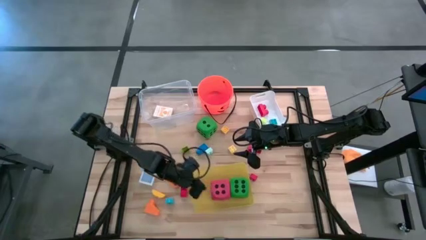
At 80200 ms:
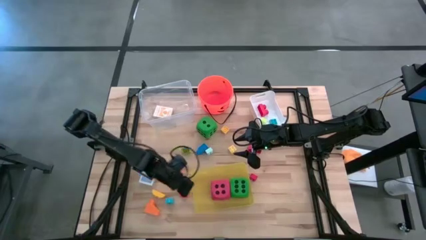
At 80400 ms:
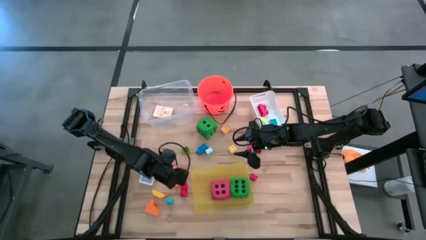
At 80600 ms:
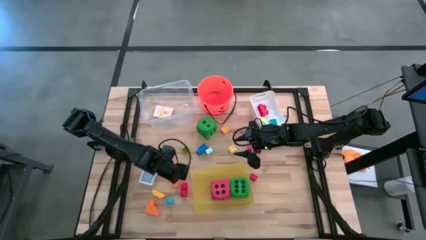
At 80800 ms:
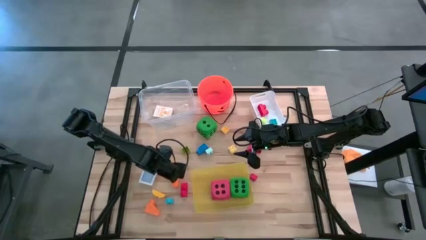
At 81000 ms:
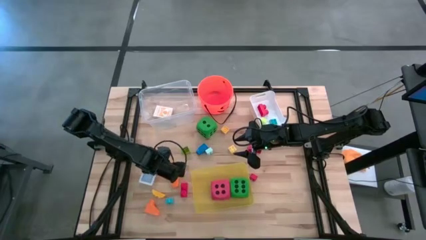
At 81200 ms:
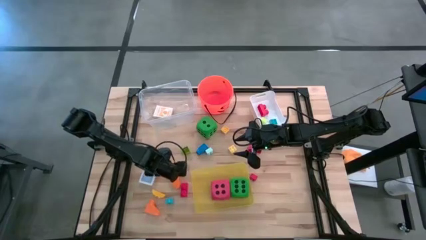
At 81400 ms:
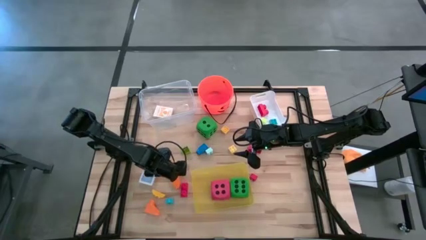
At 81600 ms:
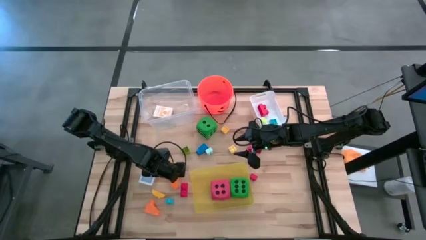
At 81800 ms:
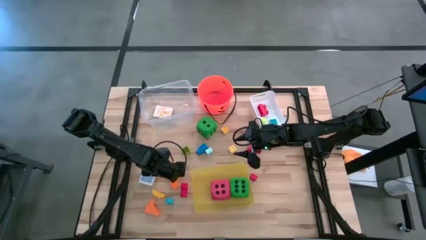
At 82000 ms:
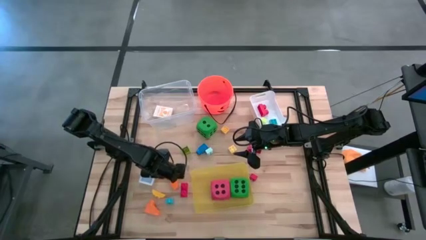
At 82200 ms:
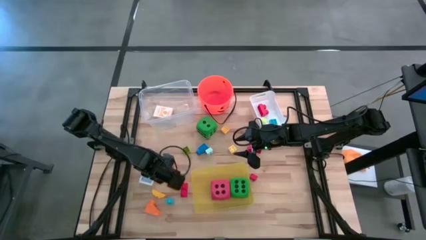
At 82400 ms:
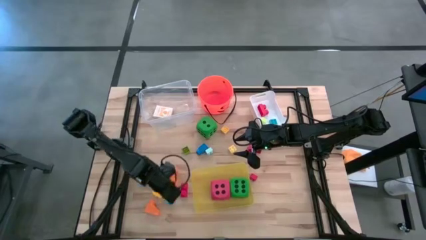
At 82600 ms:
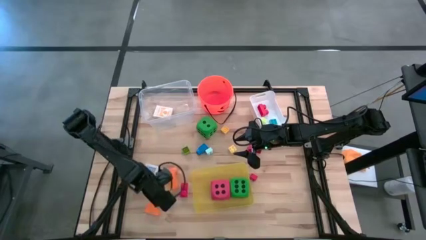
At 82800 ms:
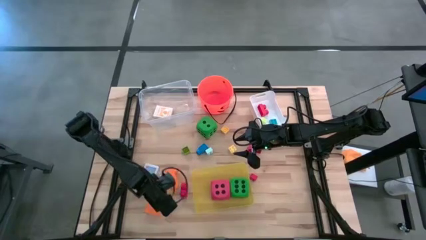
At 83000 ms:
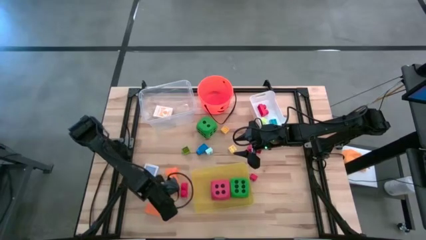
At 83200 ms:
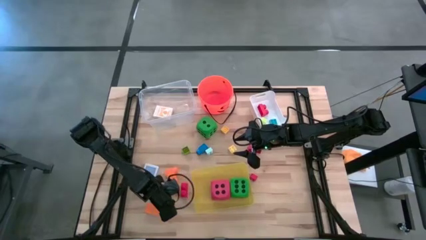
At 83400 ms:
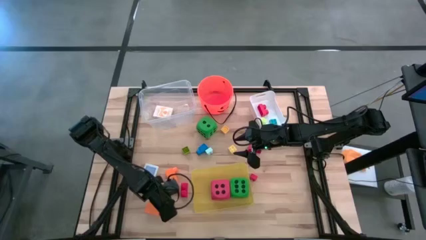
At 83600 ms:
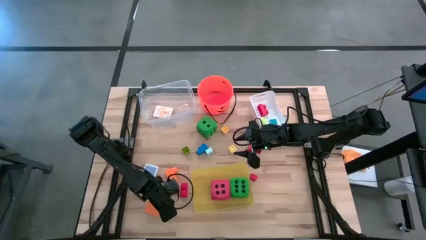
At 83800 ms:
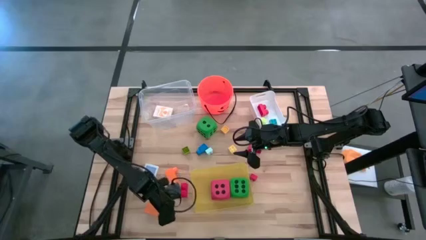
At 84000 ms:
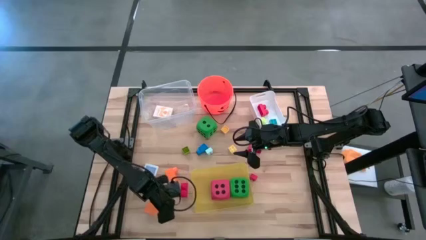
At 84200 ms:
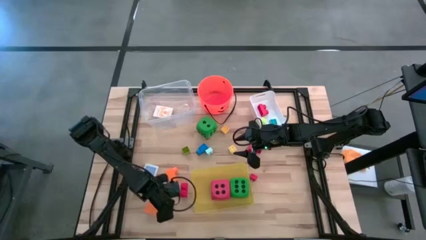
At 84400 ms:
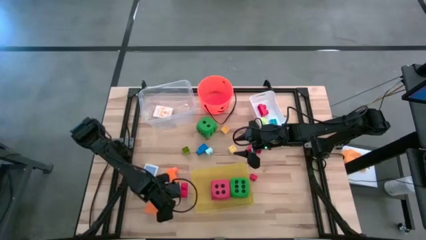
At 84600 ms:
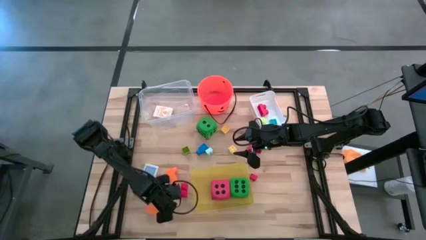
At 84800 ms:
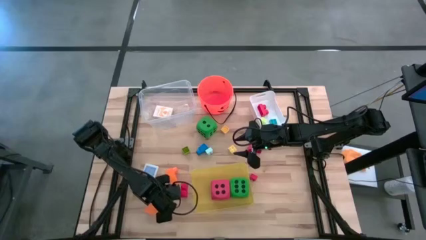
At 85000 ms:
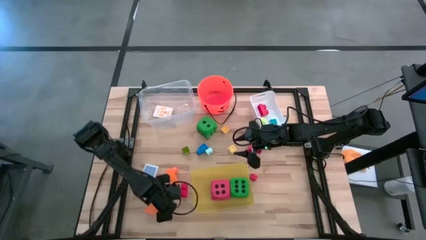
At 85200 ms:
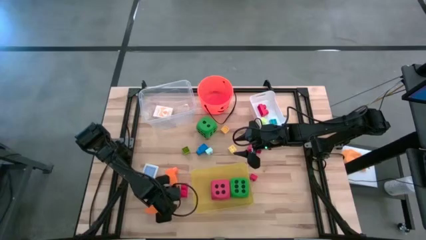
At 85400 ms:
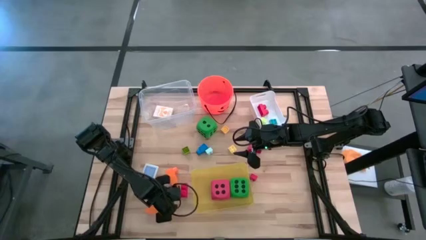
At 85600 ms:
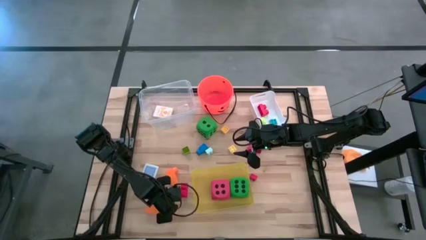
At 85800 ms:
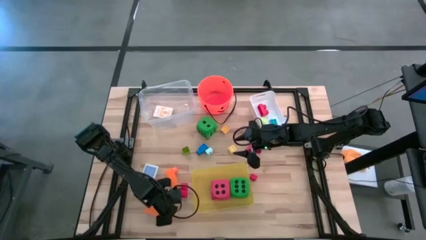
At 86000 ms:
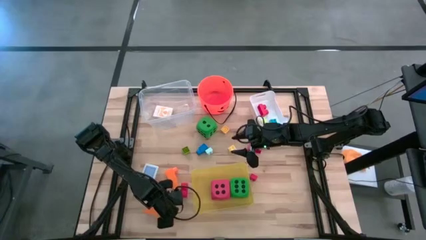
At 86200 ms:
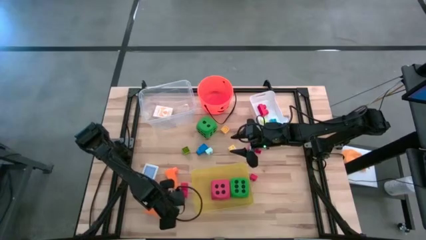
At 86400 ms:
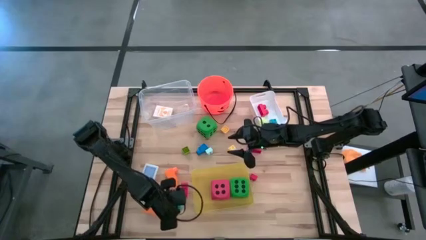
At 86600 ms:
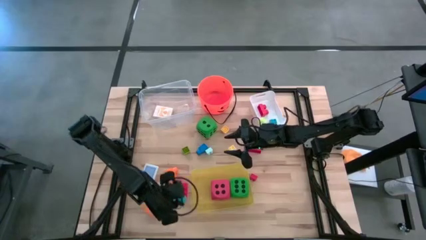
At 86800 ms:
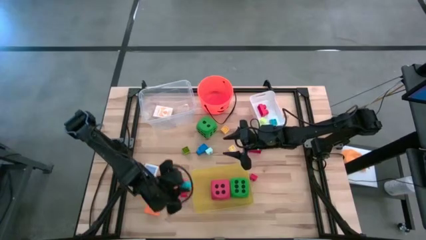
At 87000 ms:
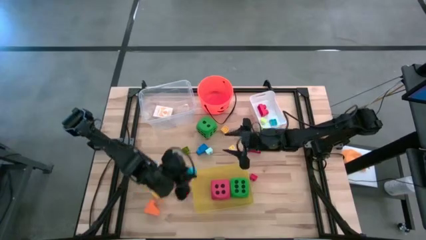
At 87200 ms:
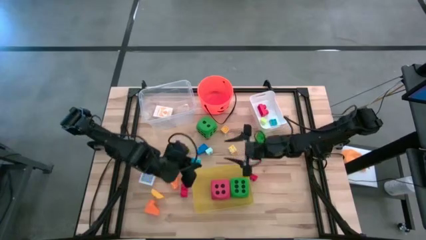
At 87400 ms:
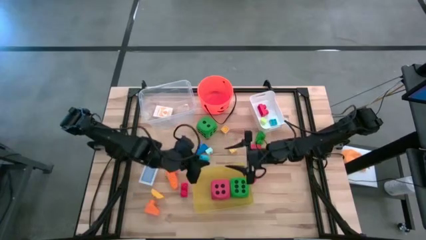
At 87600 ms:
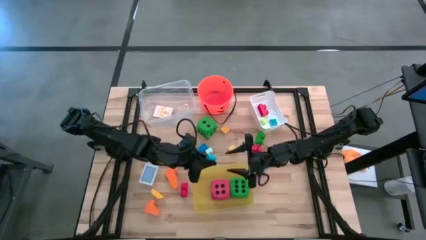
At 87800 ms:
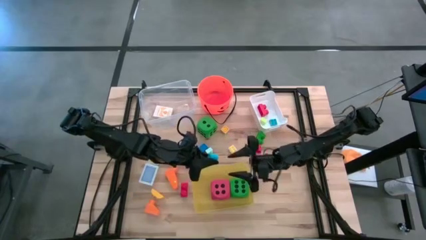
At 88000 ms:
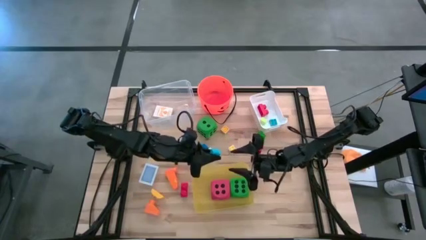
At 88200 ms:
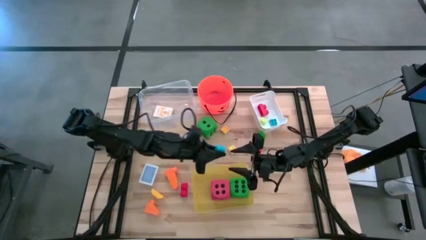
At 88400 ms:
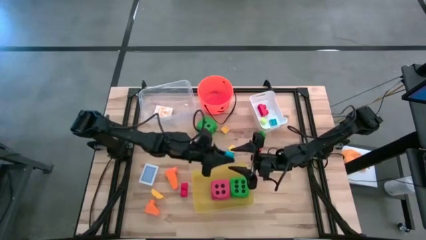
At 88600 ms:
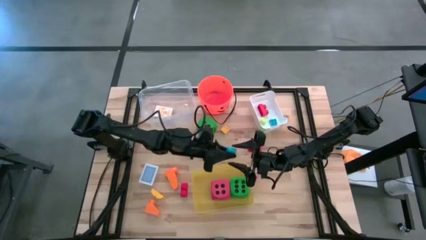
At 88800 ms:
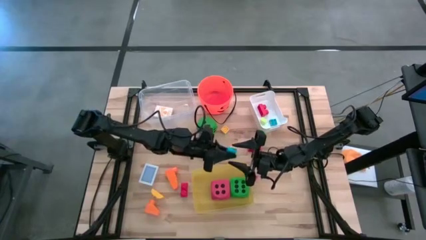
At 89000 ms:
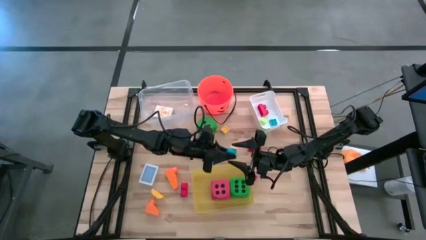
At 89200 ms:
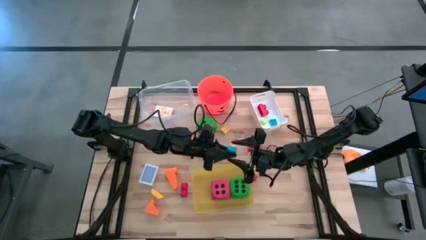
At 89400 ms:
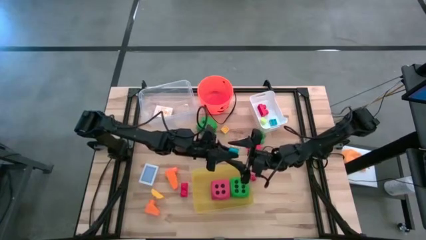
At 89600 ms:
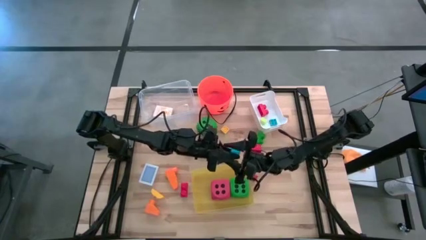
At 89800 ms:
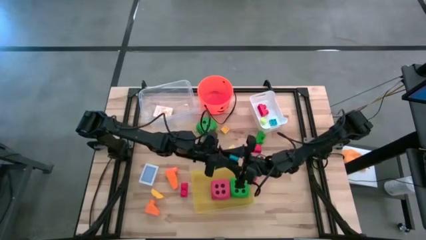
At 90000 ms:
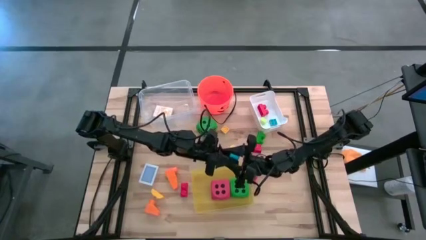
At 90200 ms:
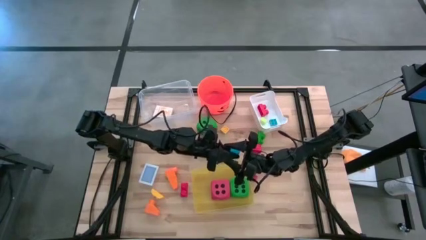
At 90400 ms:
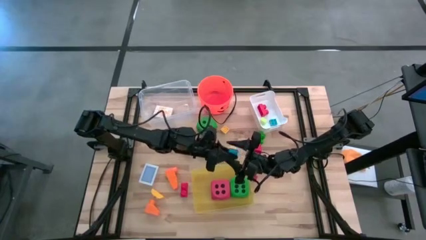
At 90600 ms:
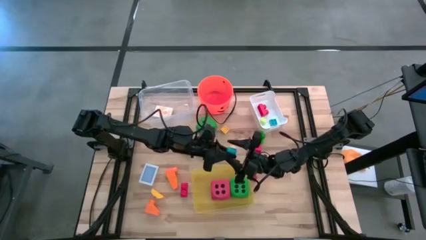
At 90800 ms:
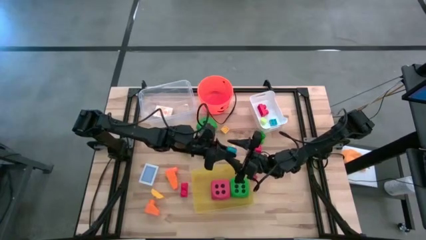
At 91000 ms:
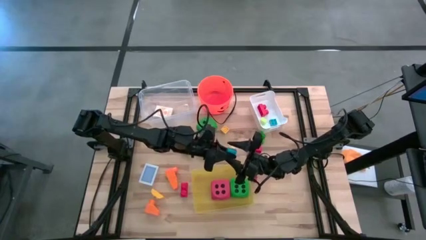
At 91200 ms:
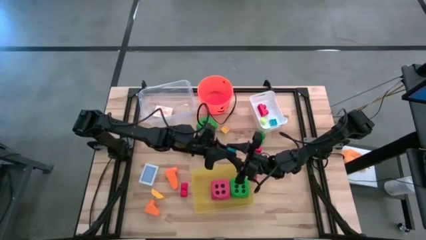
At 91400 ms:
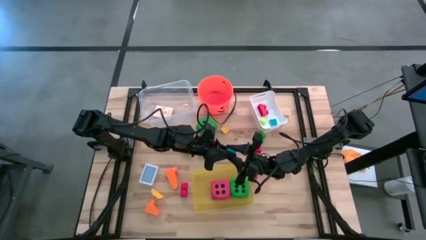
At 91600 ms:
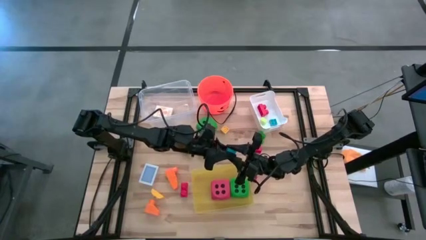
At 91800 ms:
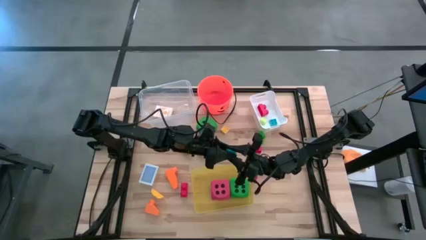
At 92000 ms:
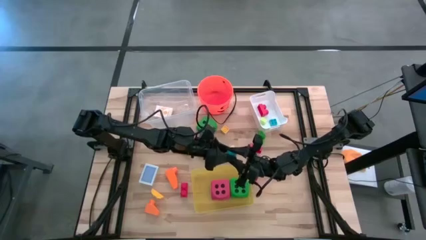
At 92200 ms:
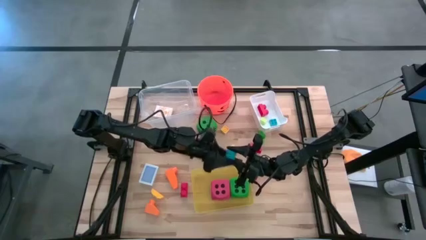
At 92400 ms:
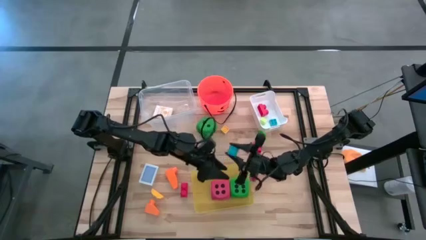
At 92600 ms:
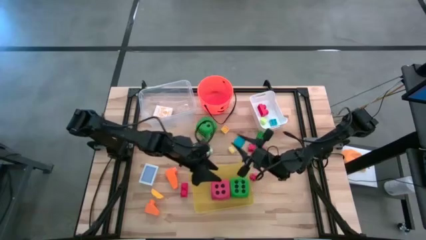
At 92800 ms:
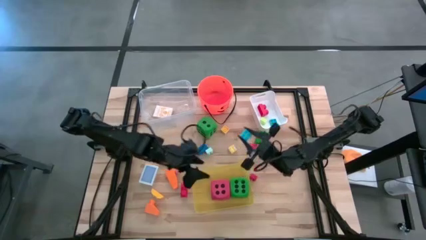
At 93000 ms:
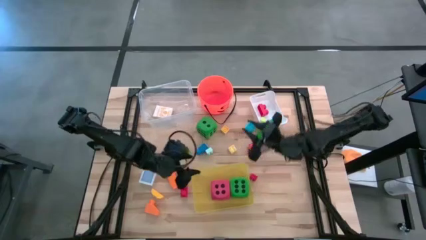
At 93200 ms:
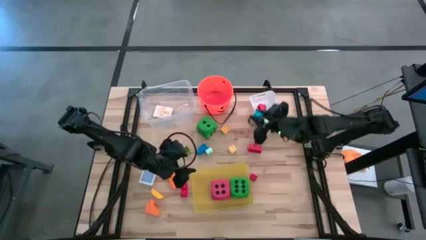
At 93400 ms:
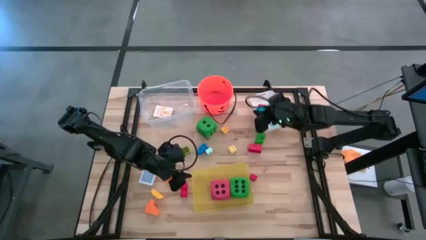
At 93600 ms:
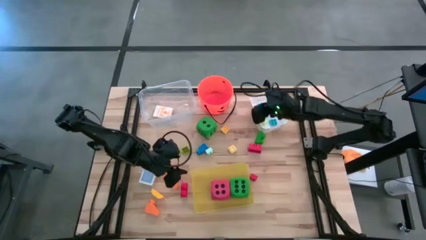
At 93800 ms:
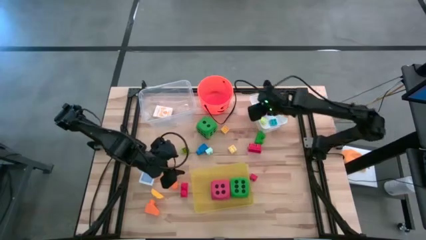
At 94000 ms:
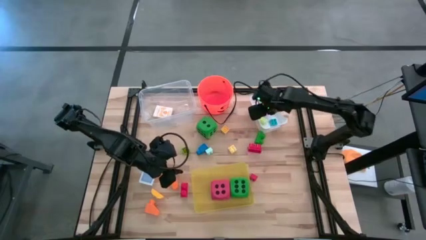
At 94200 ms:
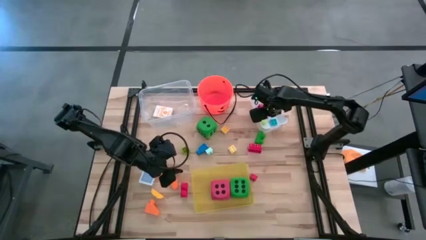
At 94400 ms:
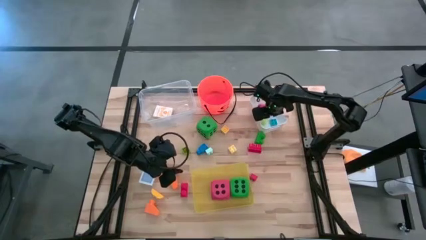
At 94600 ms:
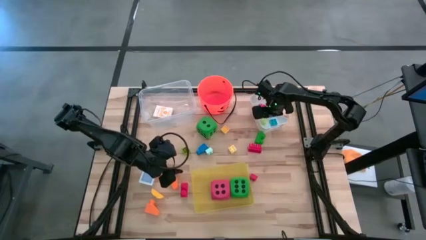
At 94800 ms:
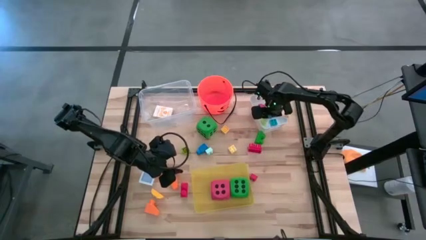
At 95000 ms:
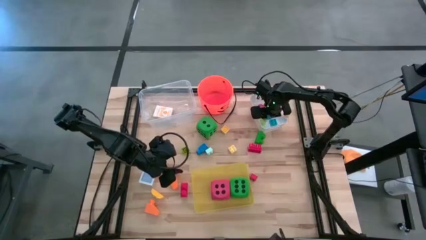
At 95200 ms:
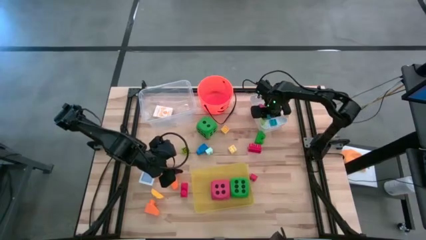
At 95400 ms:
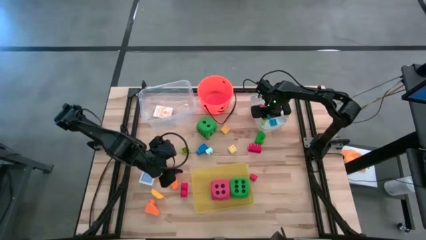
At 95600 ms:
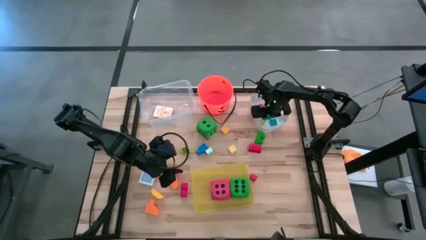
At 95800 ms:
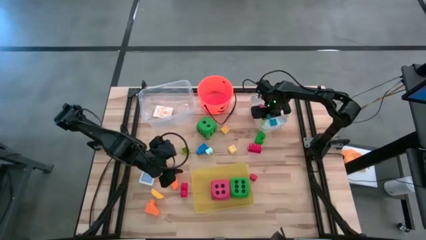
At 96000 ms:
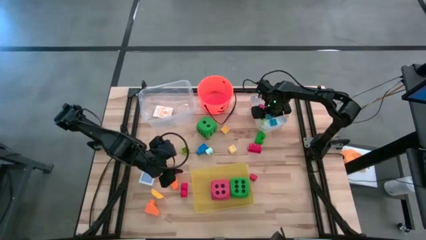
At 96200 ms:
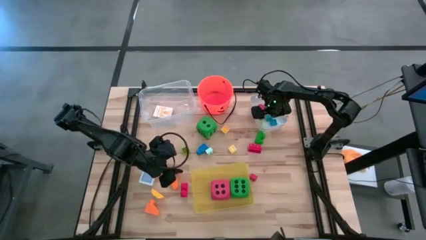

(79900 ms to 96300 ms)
Task: Pick & Place Toys
Put the blue game piece into the white bin

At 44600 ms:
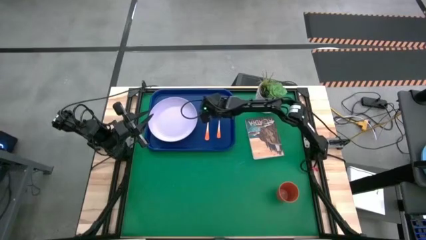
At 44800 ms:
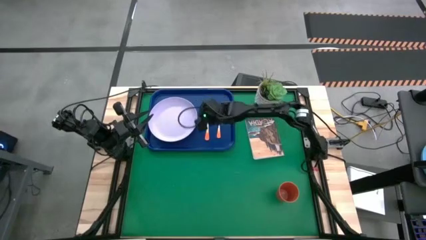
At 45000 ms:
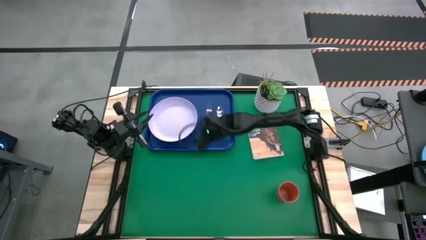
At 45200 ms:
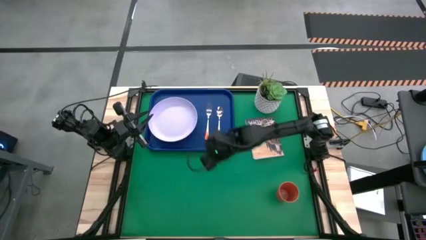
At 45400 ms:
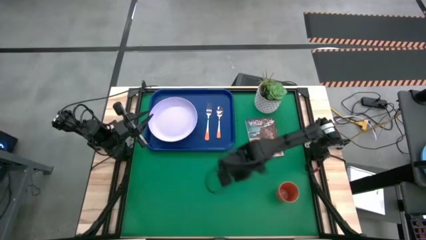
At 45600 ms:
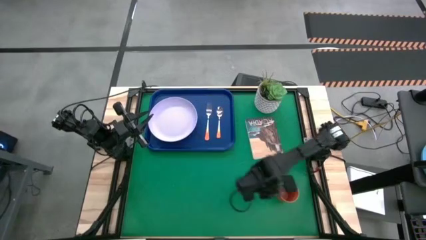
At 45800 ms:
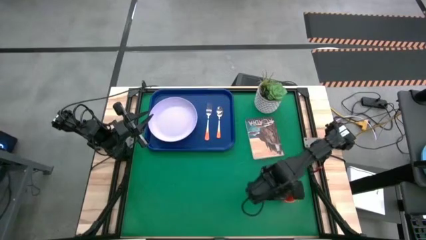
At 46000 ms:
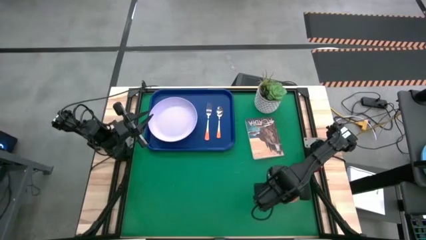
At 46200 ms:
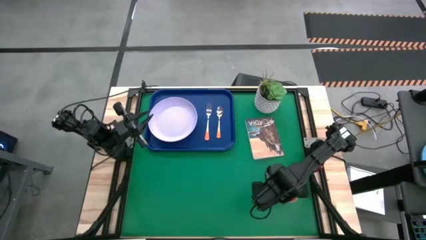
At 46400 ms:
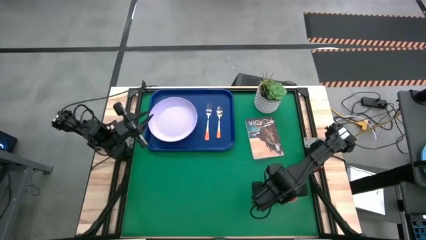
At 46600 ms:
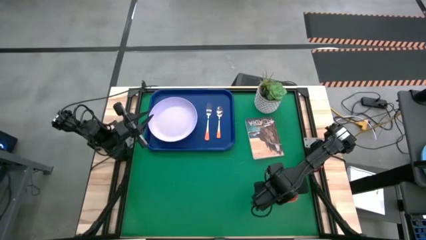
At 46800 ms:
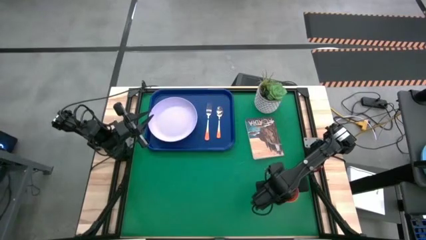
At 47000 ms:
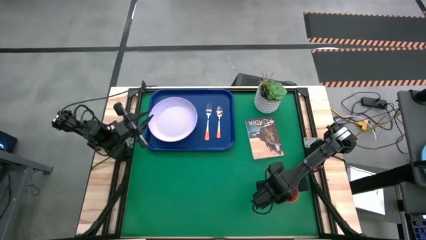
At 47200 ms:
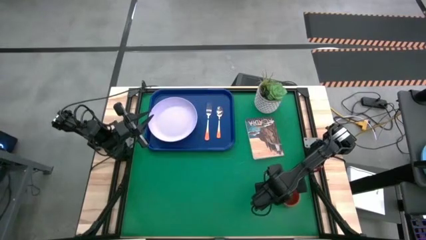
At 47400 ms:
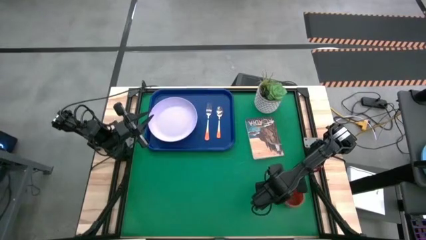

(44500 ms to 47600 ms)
Task: Pick and place plate/cup/fork/spoon on tray
Put the orange cup on the blue serving tray
